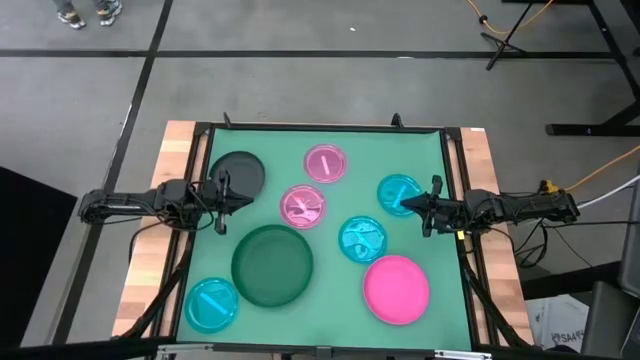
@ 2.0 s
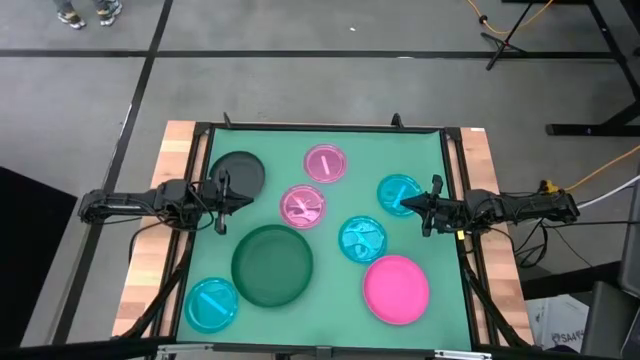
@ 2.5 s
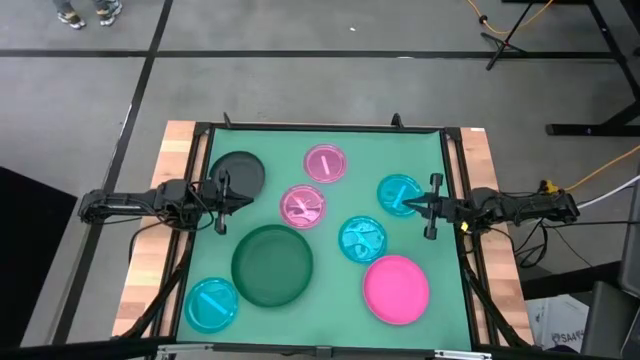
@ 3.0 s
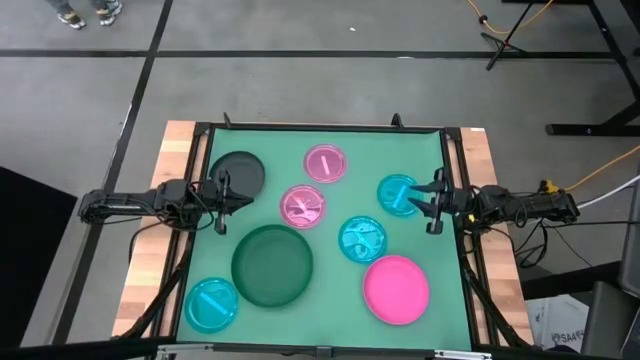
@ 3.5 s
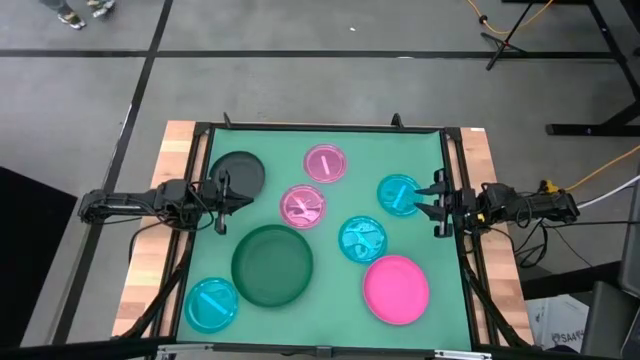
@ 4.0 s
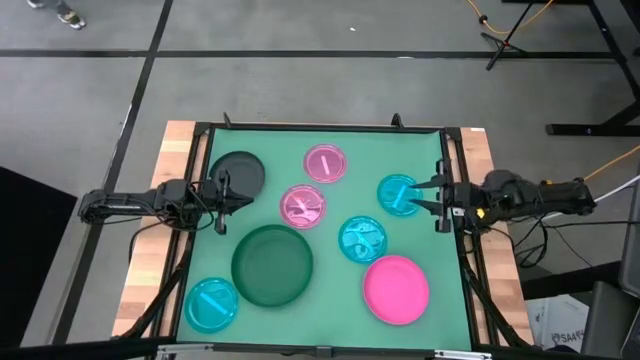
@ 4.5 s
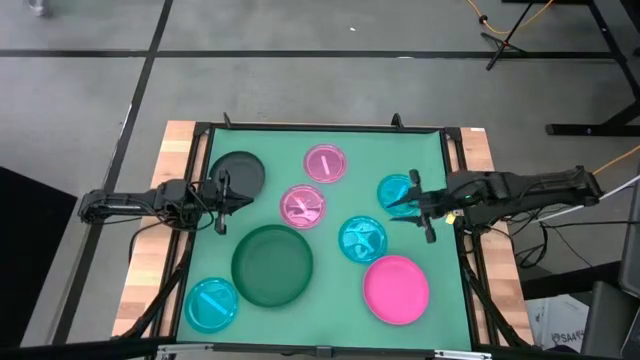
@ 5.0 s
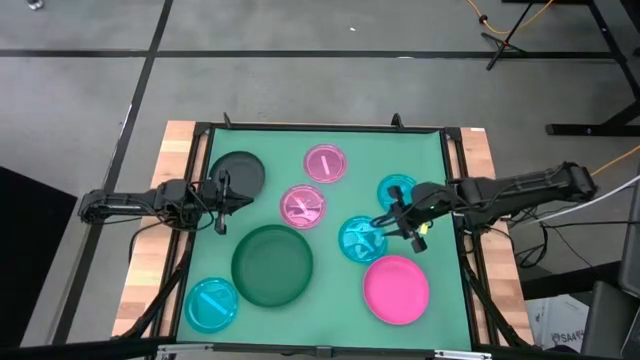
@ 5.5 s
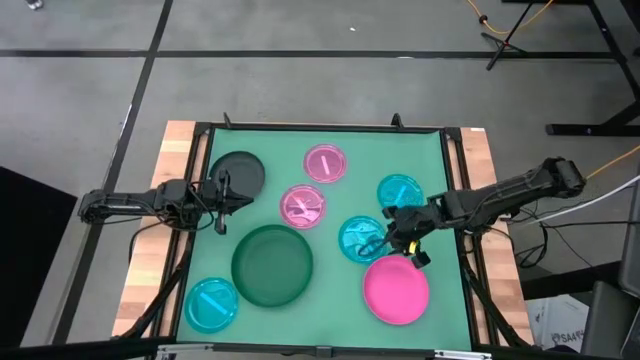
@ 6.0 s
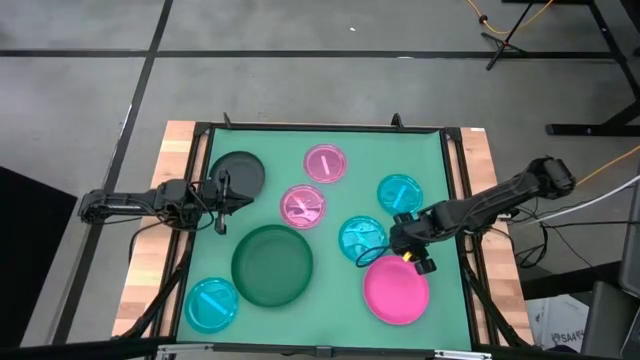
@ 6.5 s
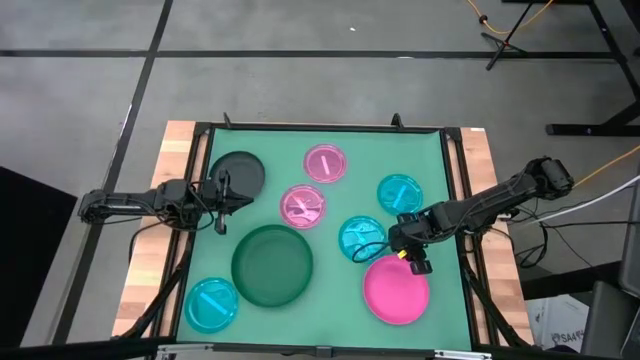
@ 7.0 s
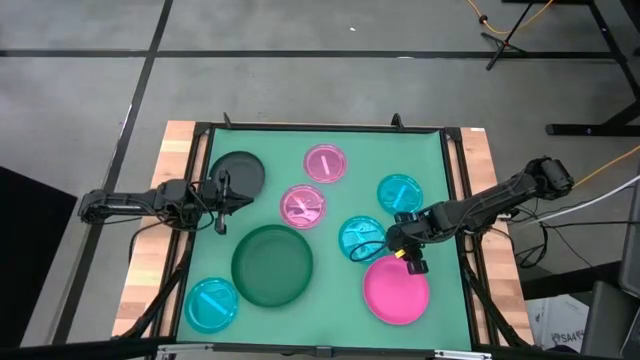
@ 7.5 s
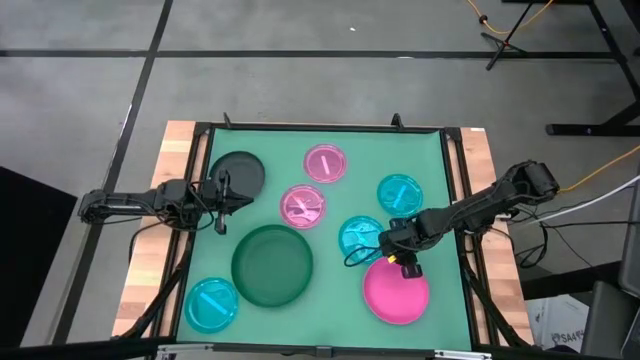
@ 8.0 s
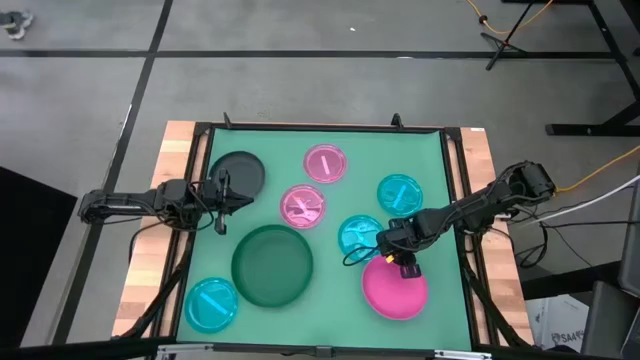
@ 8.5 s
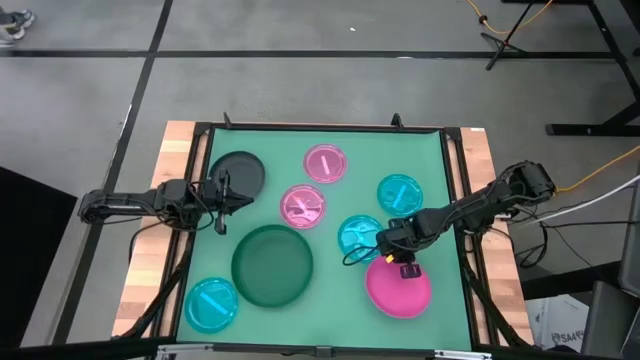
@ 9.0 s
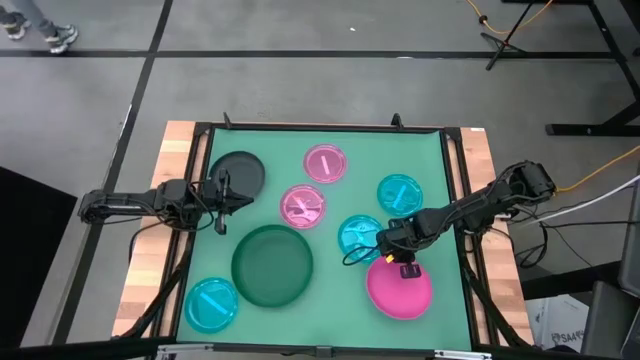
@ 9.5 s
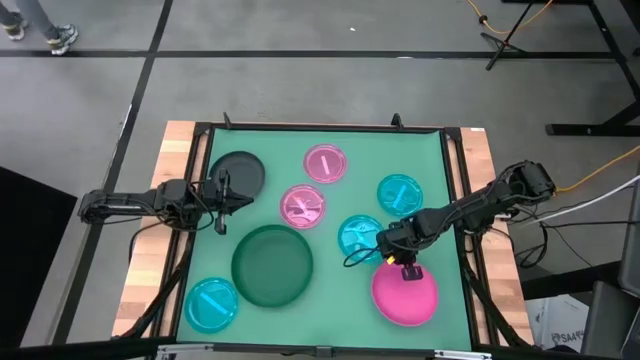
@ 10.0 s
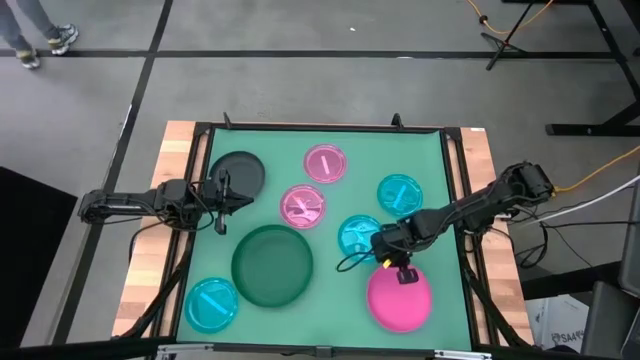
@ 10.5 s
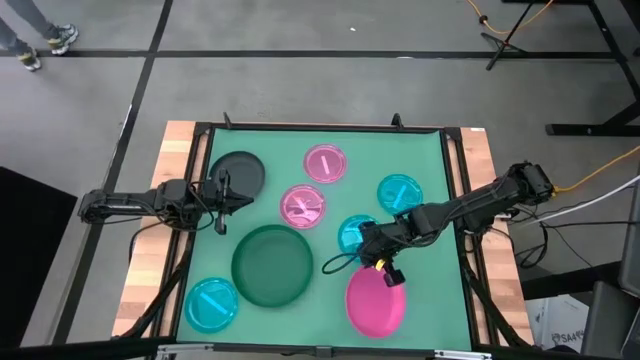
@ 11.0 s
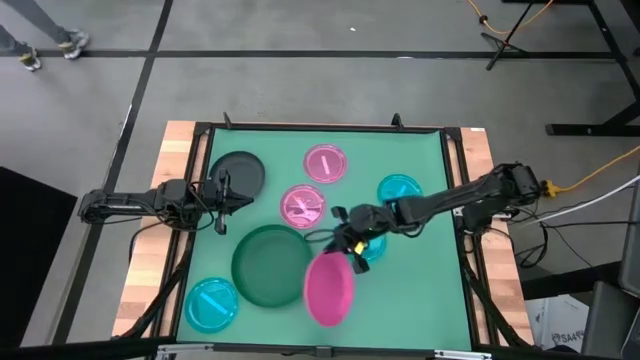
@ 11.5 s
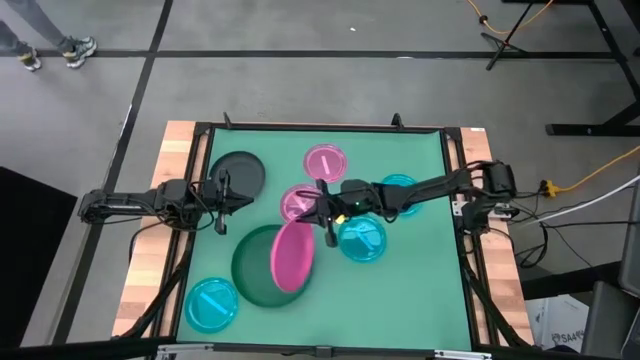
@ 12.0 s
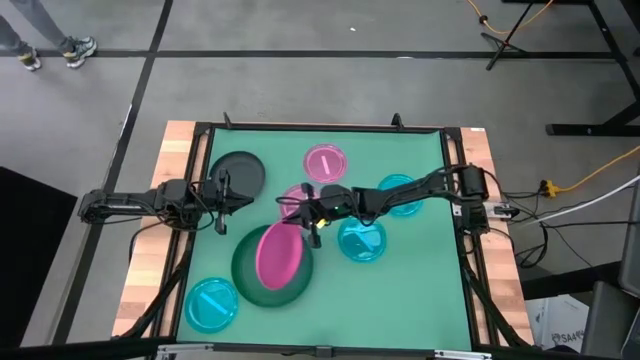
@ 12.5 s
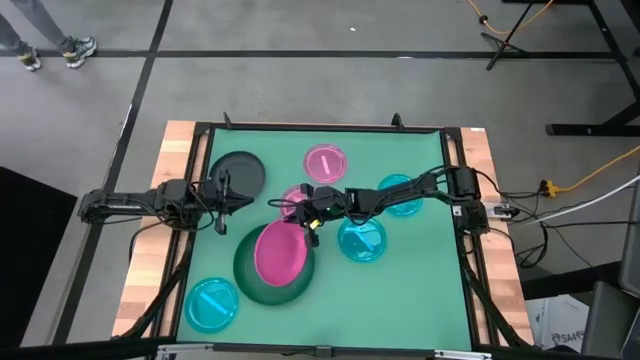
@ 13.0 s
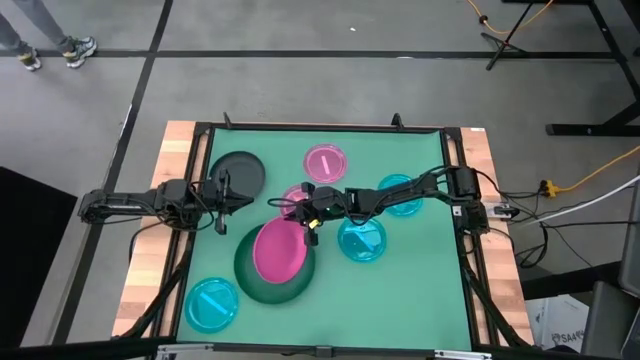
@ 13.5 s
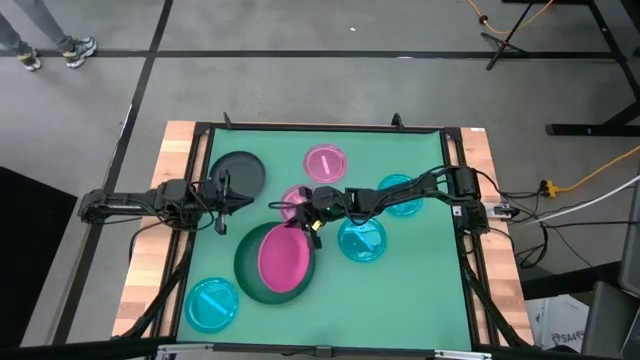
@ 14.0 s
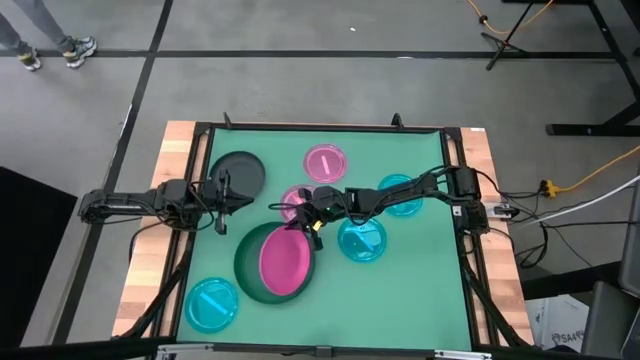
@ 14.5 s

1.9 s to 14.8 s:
Task: Stack plastic plates
Stack the pink plate on top of the green plate

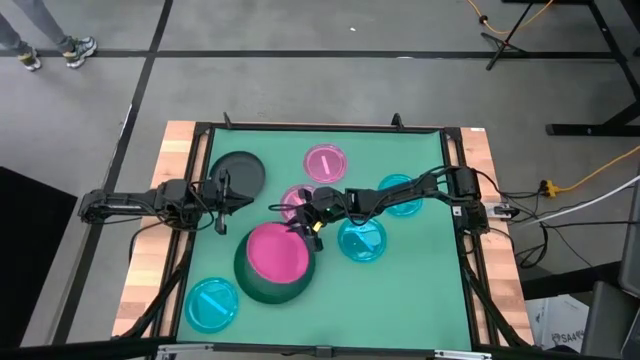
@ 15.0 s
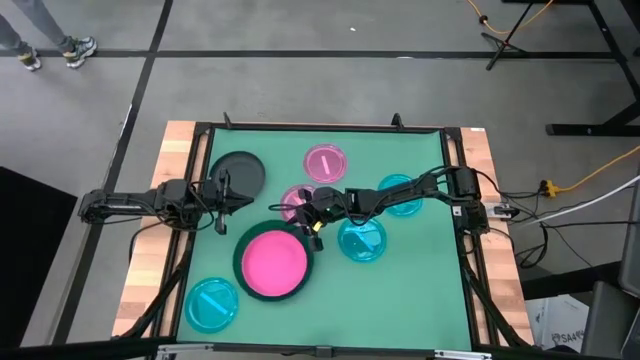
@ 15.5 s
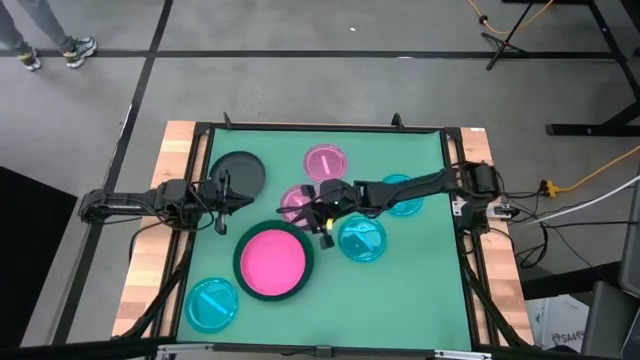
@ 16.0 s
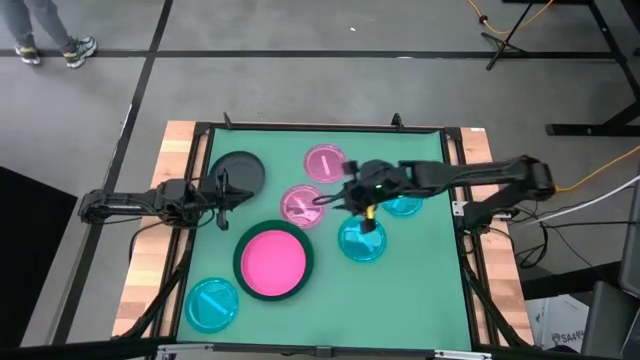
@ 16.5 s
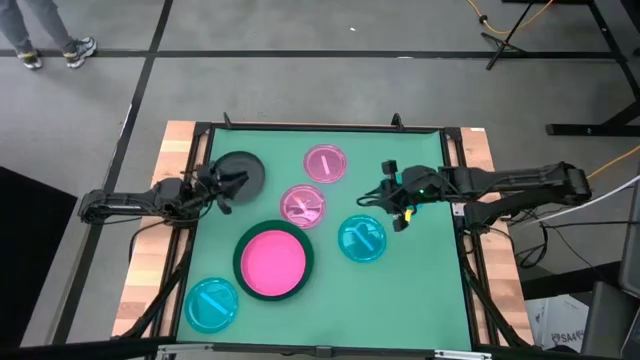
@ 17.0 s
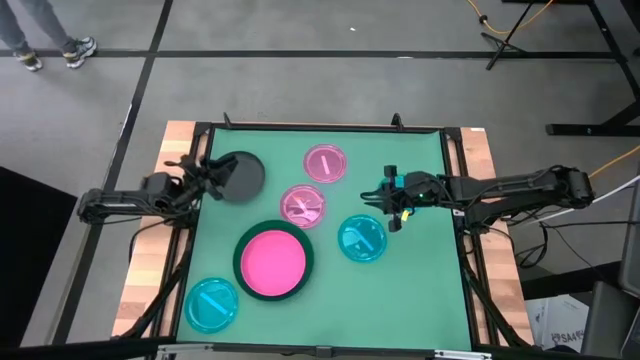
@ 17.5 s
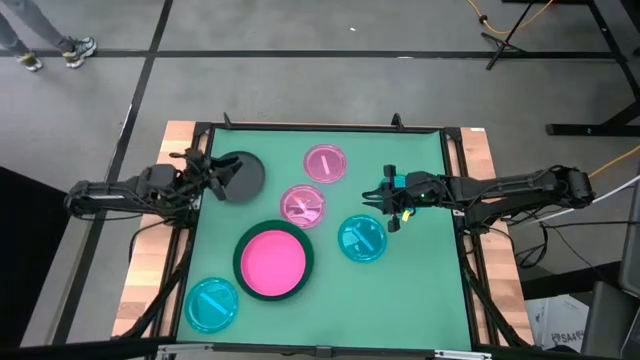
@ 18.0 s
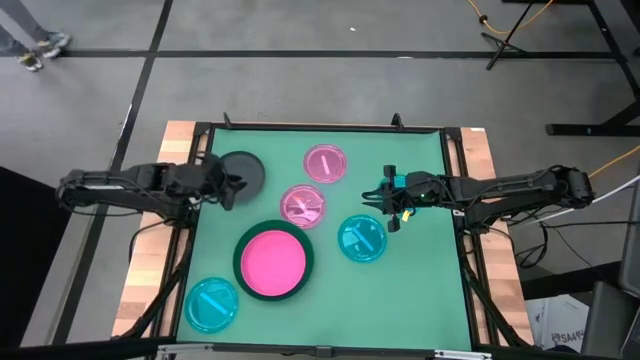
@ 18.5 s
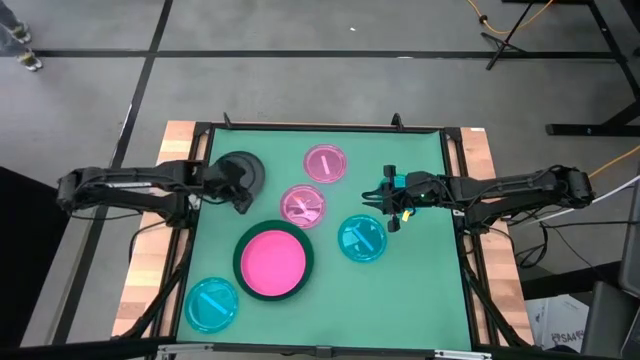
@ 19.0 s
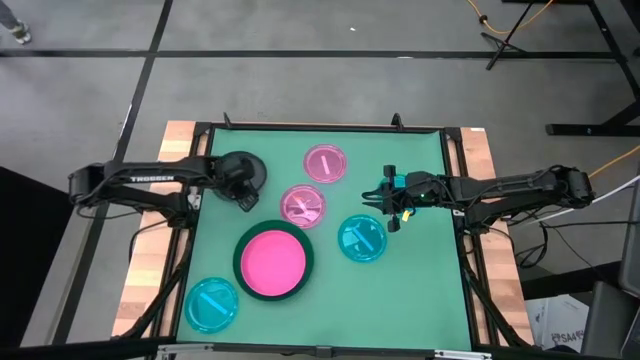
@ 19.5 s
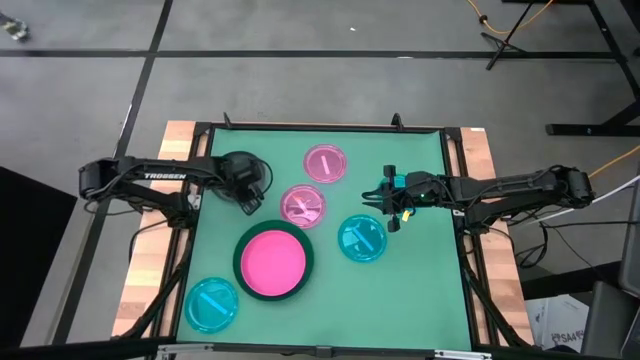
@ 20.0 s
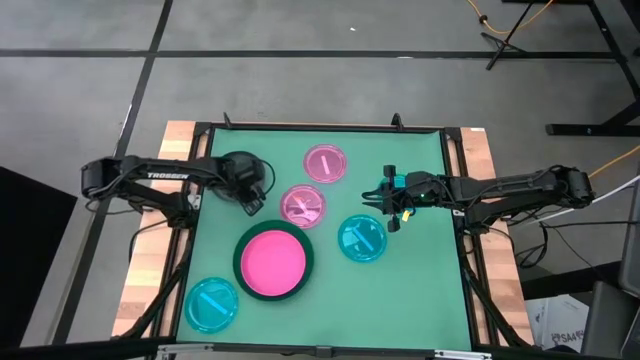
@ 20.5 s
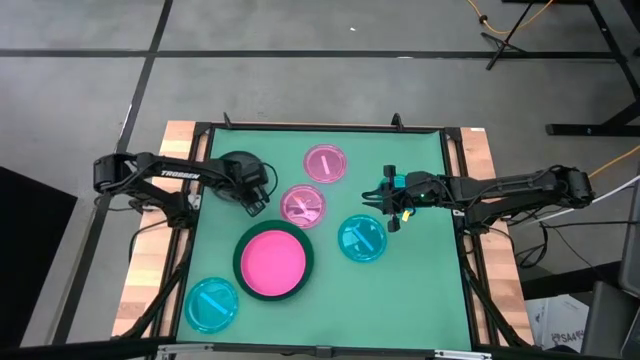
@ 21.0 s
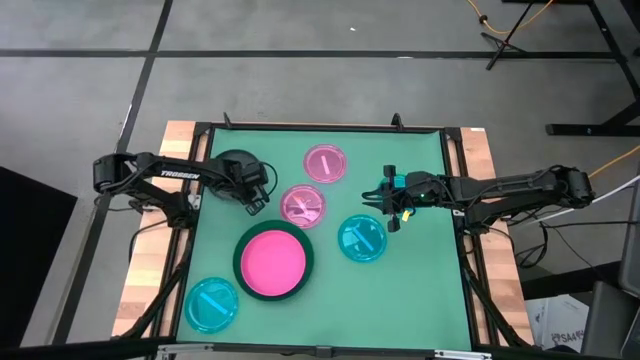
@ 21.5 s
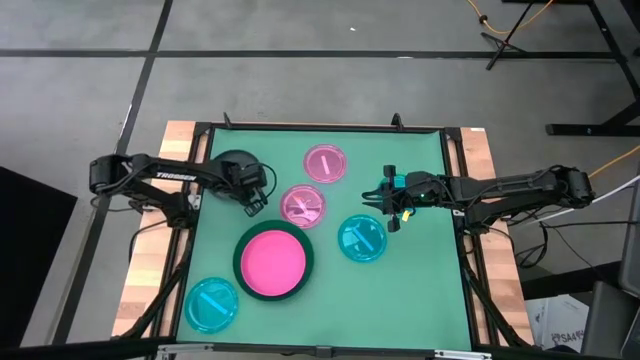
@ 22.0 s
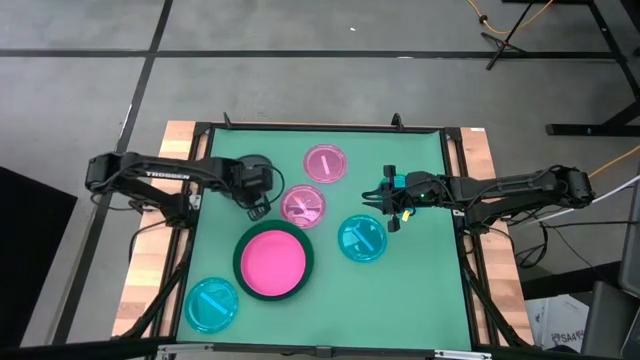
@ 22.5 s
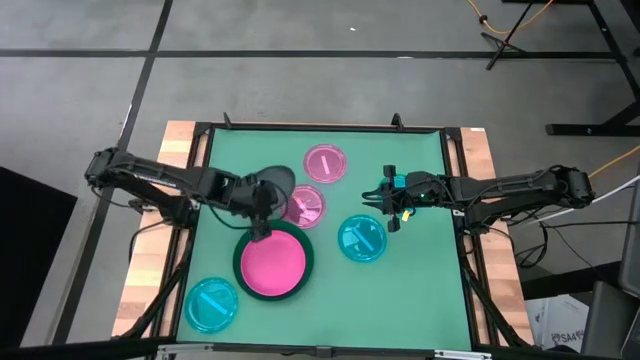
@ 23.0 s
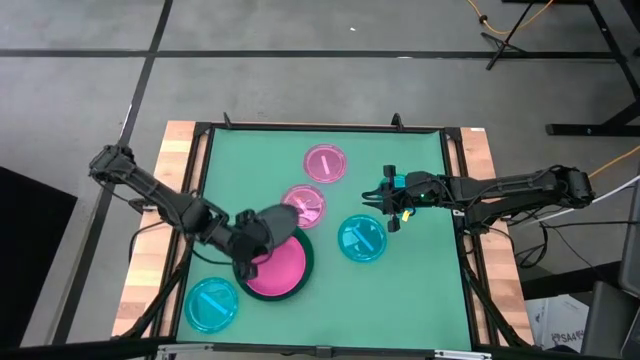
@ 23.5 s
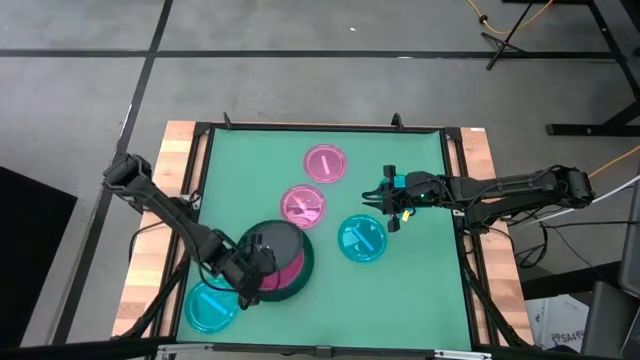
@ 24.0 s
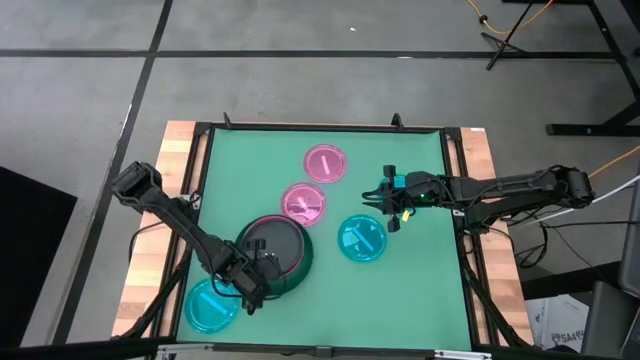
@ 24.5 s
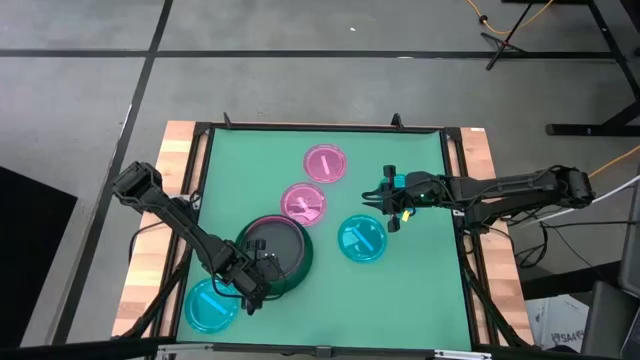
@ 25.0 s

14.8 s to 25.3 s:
Stack the black plate on top of the pink plate
